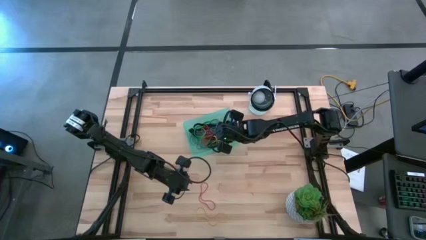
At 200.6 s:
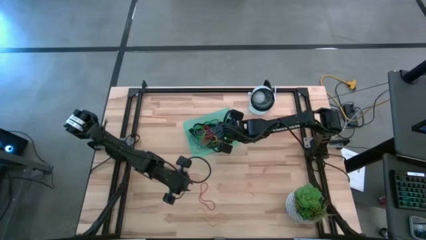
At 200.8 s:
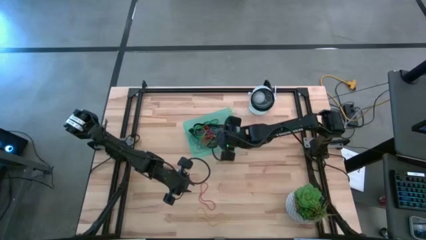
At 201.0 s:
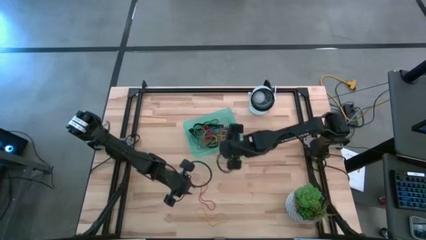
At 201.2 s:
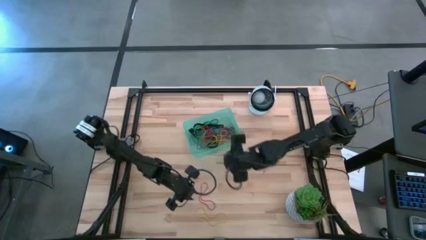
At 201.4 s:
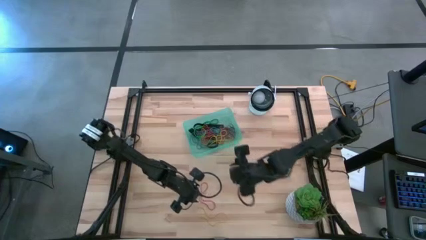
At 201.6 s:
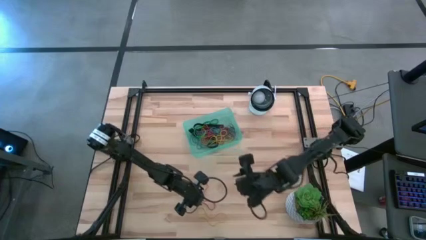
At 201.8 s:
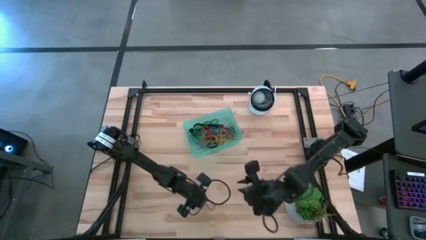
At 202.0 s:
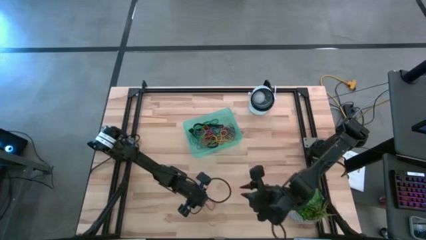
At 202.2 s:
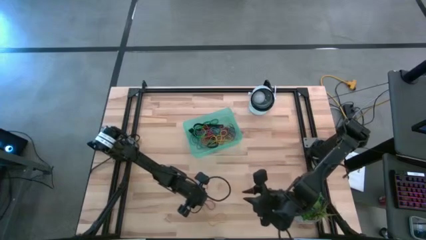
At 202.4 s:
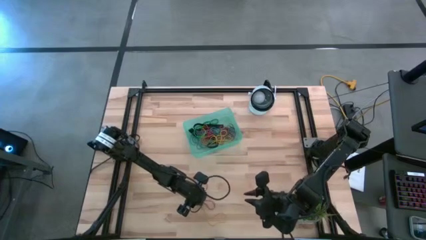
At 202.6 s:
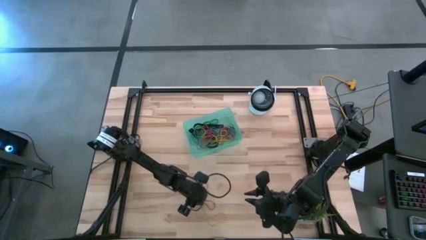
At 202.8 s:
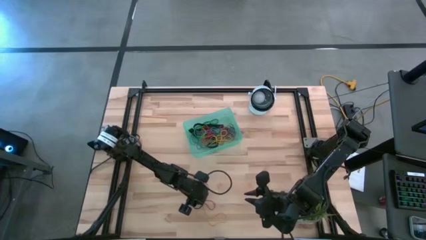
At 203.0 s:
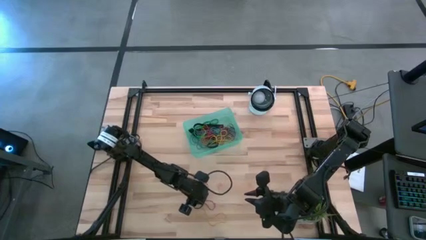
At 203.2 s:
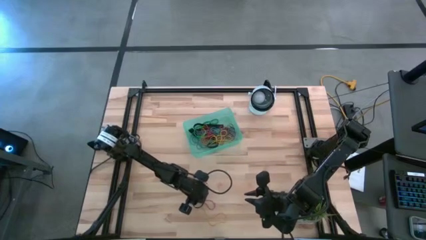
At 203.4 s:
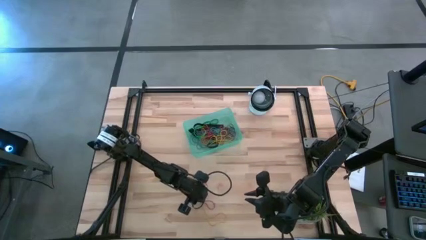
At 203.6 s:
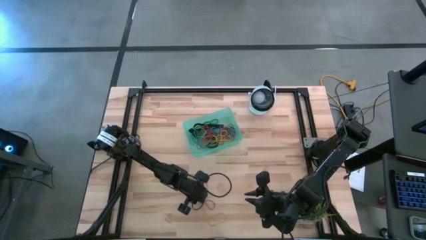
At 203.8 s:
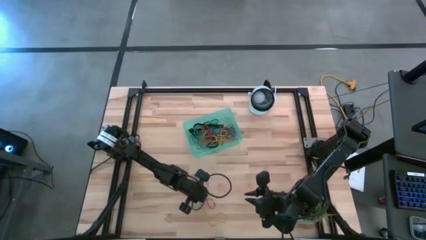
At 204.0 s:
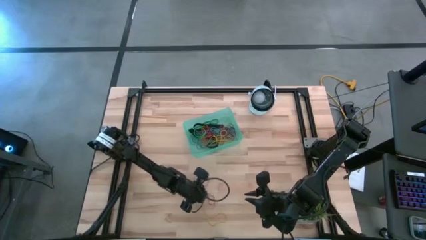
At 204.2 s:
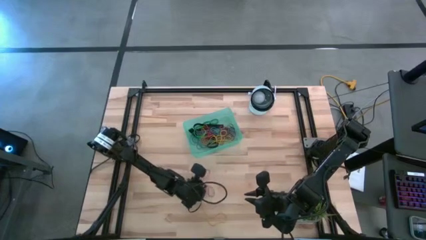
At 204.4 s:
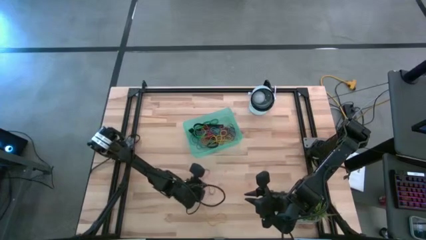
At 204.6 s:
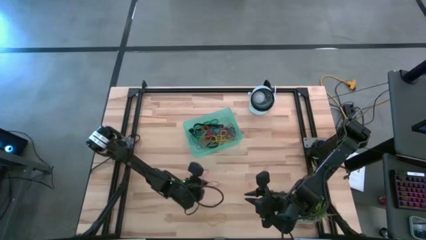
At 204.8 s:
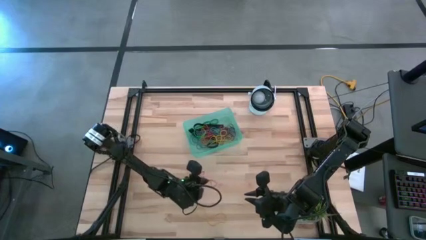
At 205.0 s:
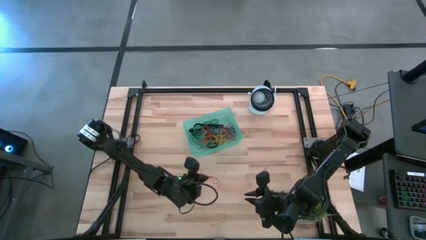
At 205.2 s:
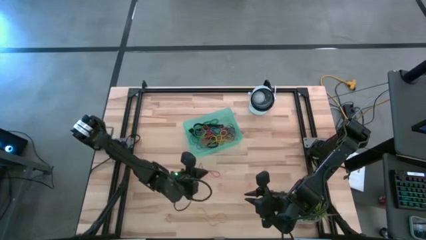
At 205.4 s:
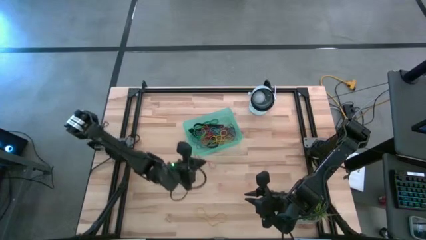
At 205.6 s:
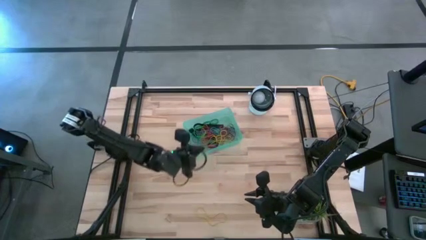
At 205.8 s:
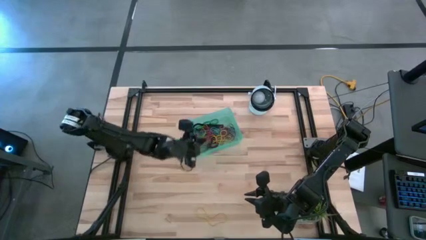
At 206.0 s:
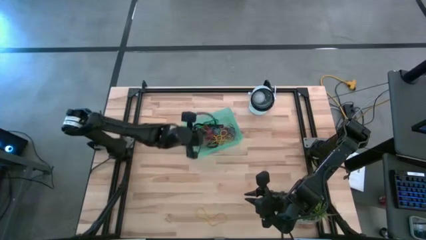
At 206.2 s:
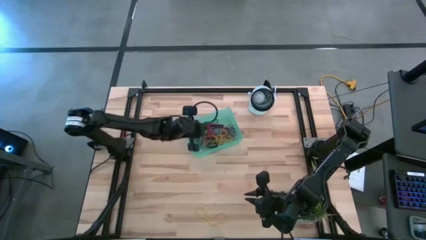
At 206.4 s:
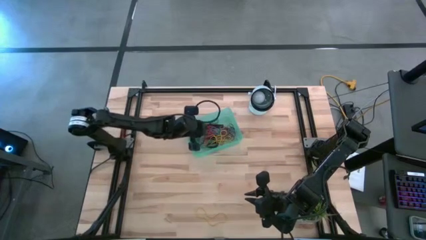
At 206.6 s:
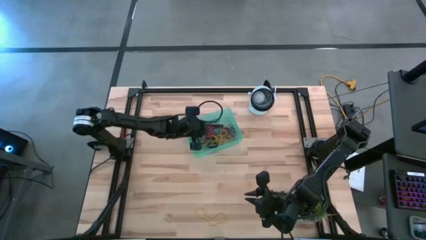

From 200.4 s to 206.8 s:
Task: Pick and place rubber bands into bin
Put the red rubber band into the green bin

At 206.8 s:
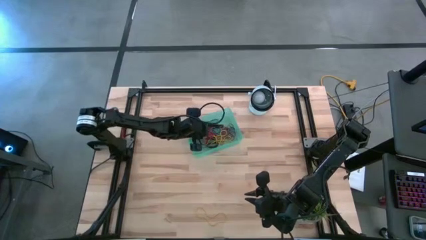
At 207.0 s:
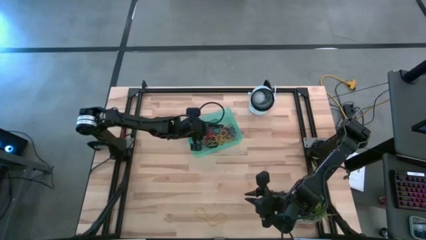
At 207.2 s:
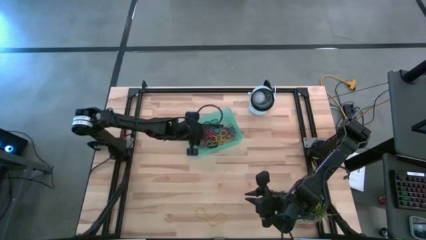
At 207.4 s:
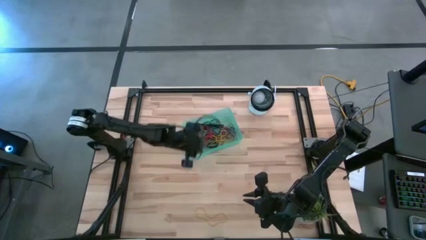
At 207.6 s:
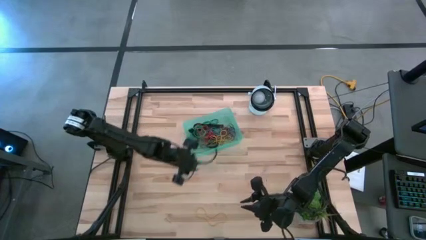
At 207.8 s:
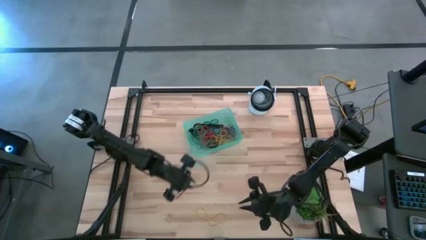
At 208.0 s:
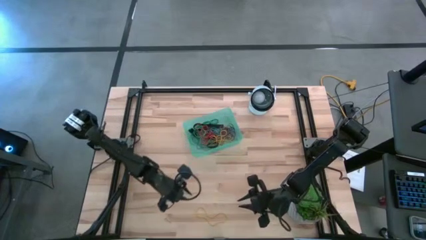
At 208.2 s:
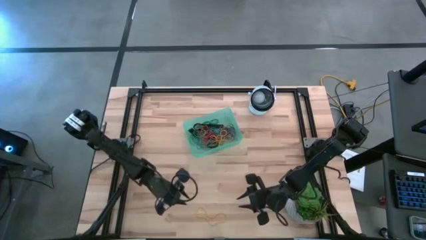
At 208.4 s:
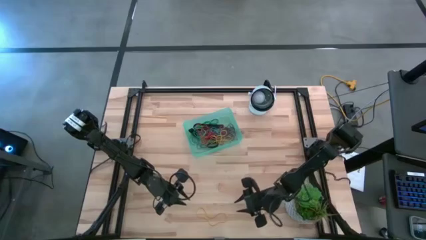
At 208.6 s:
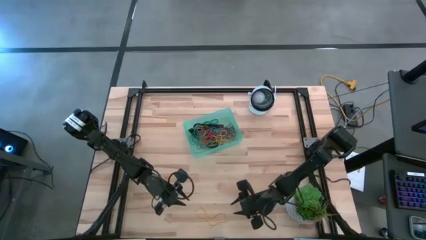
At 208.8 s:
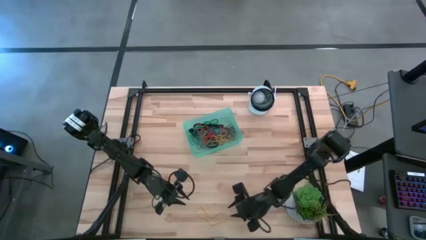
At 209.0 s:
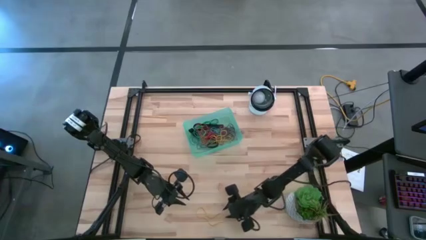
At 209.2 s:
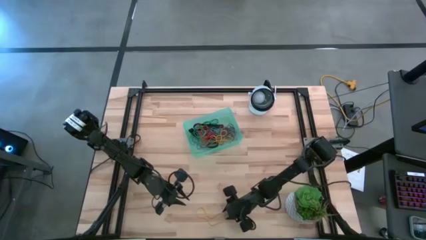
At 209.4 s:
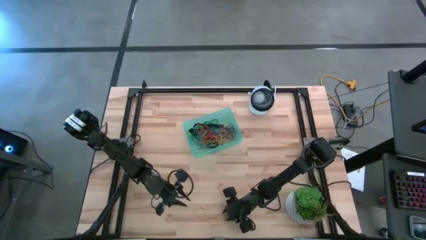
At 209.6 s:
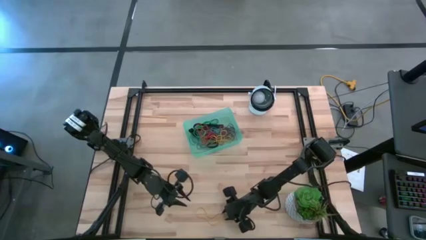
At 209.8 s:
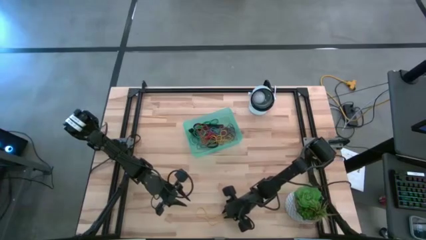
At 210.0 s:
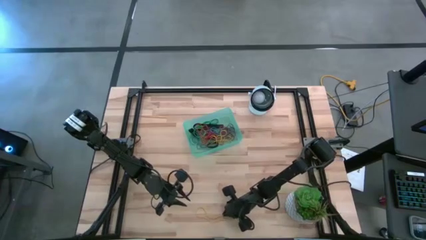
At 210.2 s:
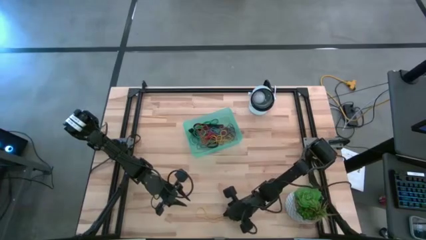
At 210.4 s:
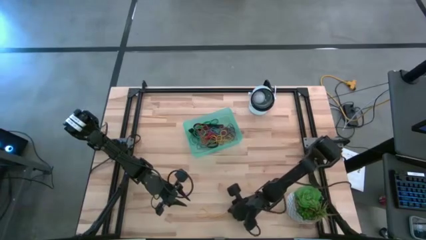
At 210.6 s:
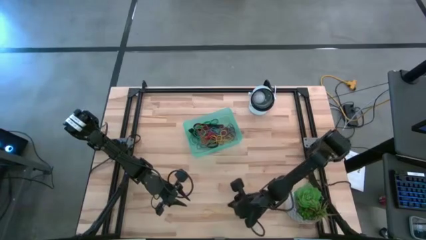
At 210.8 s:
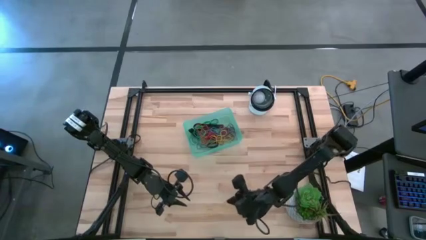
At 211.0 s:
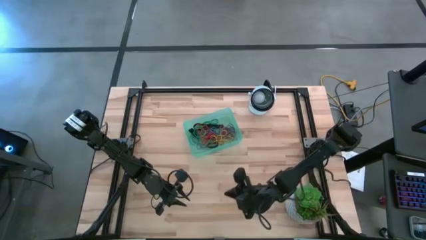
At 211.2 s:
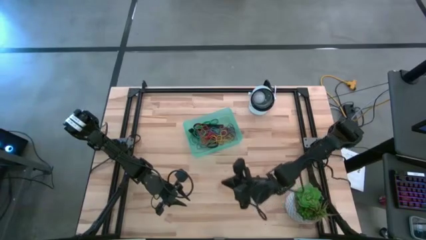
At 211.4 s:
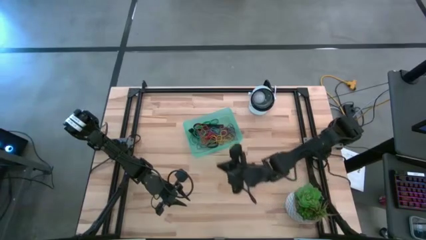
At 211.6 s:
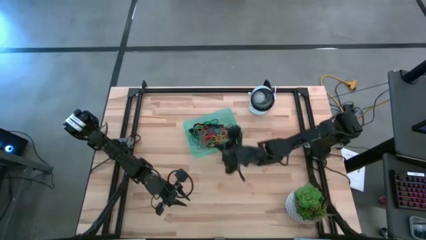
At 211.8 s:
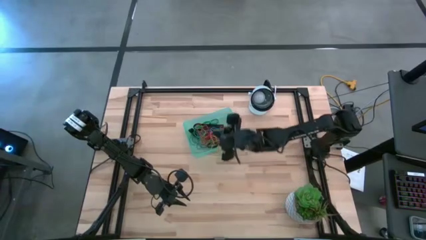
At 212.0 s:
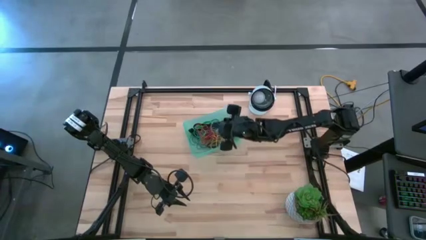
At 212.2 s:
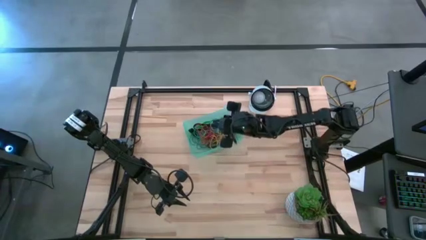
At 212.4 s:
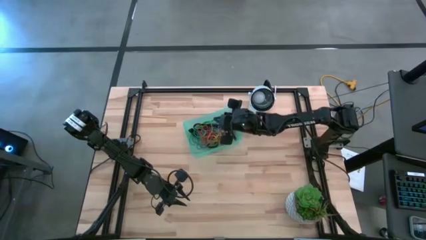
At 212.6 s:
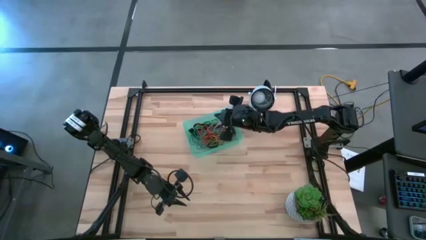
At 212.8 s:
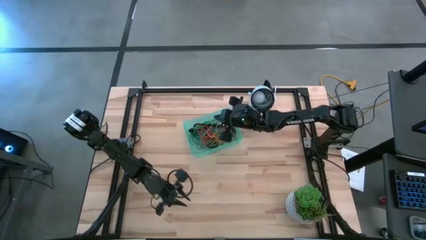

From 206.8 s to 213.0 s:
Put the yellow rubber band into the green bin
